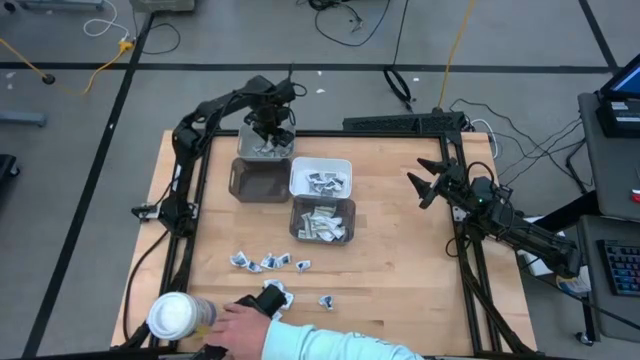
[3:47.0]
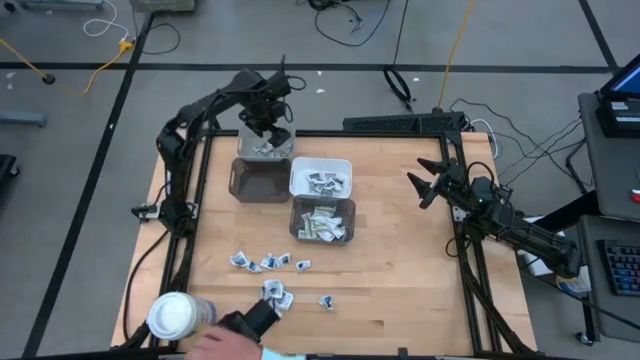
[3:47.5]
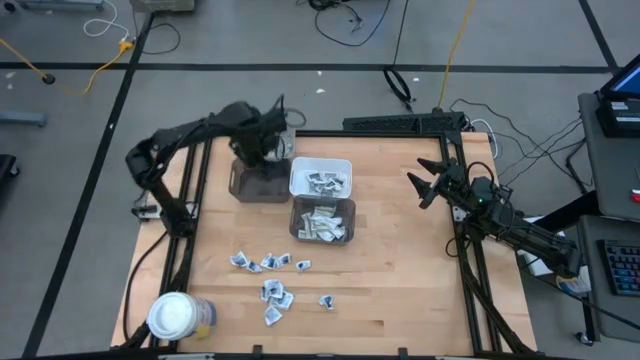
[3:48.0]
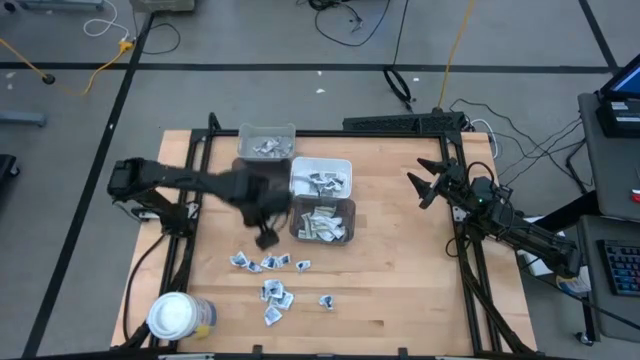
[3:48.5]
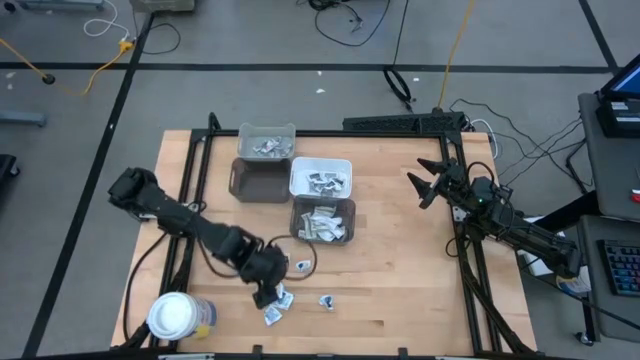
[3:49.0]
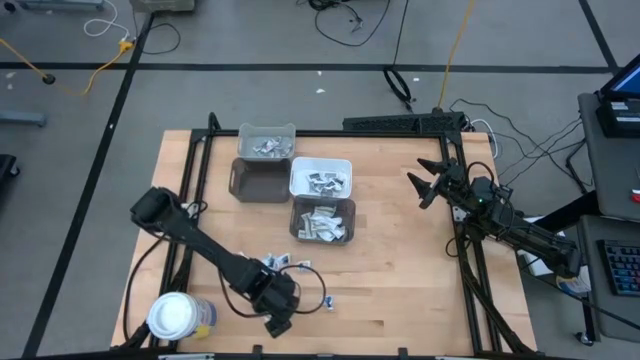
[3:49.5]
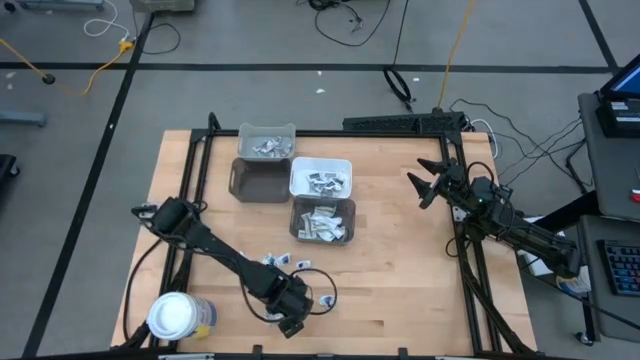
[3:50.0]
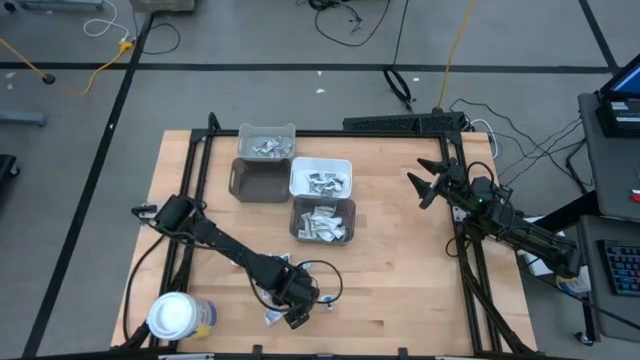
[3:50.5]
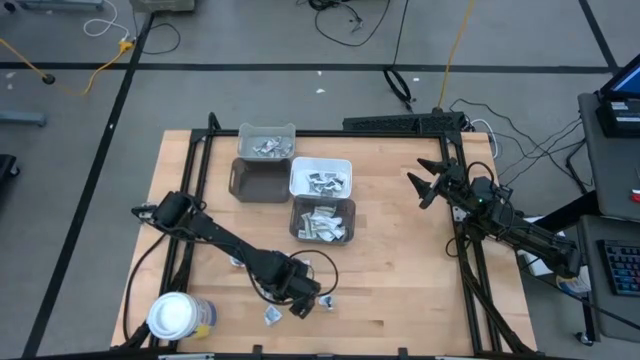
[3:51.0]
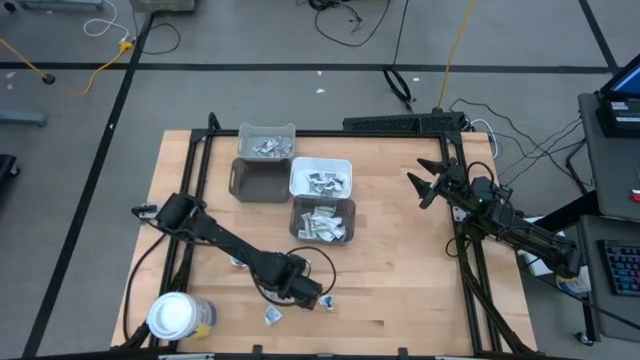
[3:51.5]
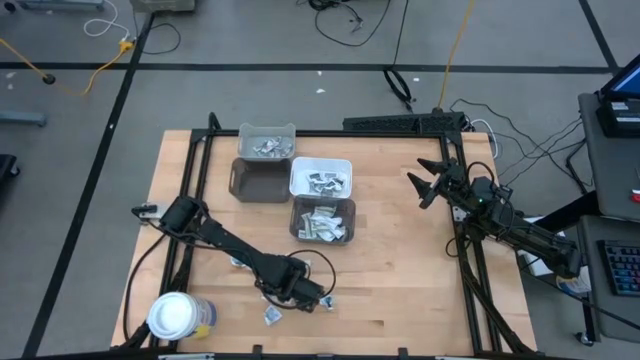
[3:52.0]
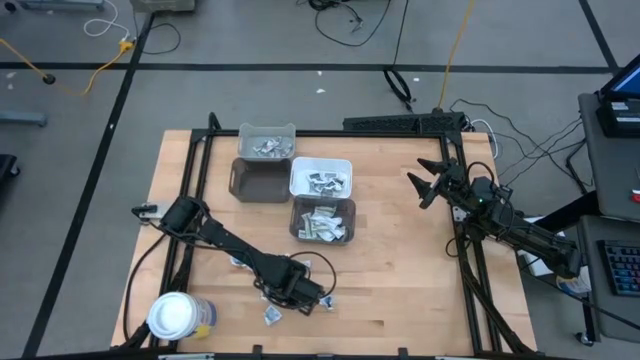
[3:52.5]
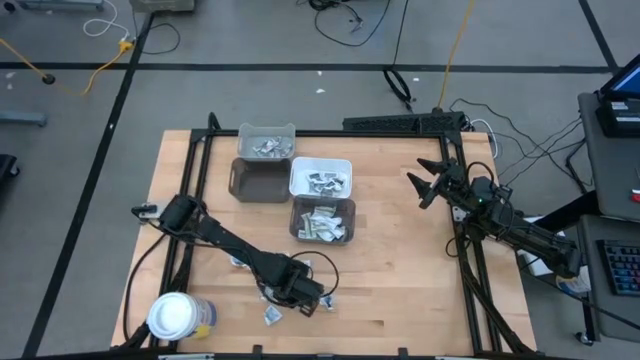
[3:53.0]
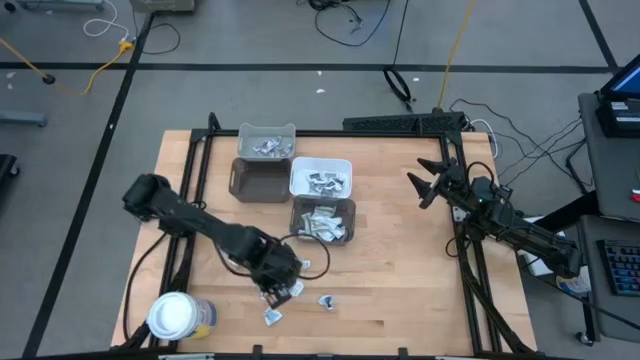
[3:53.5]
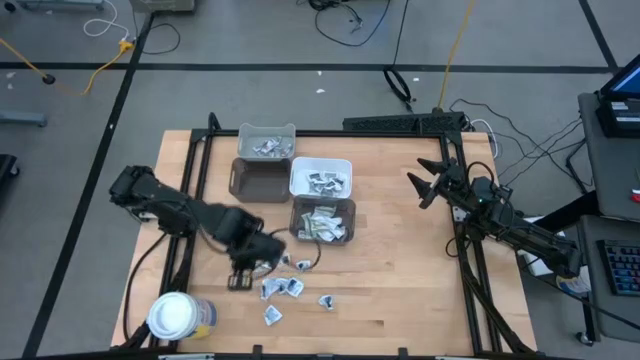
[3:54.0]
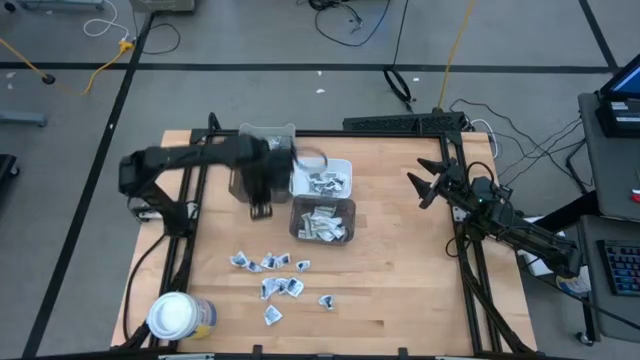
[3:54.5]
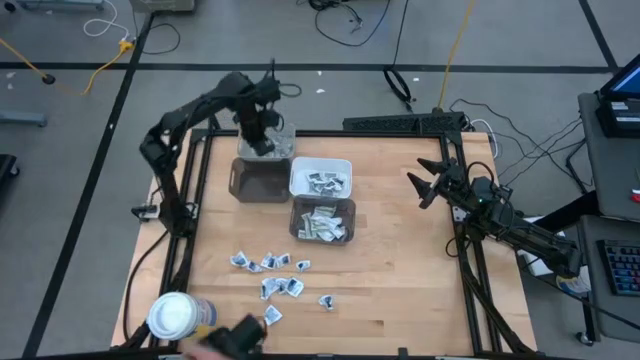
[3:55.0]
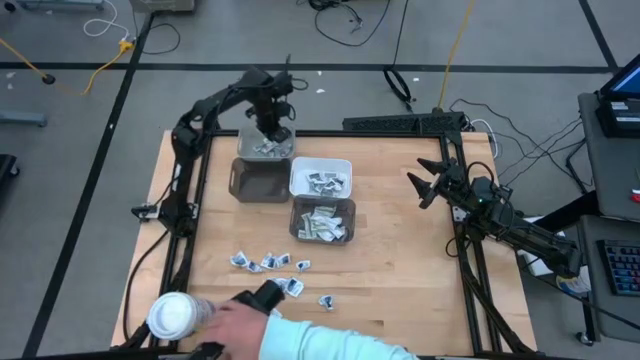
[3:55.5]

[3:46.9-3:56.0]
Task: Pick & Place First Aid Supplies
Put the orange ointment pack into the gray bin

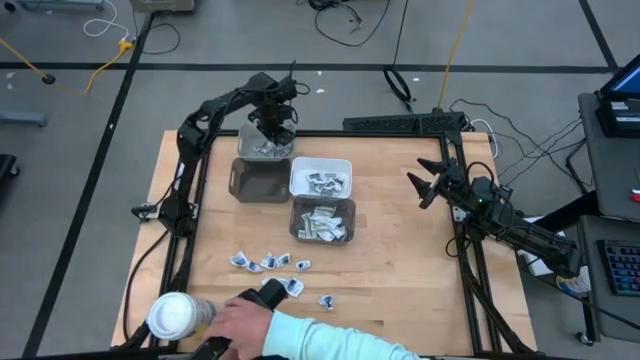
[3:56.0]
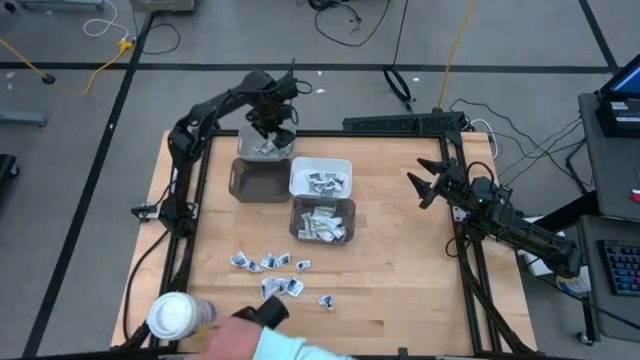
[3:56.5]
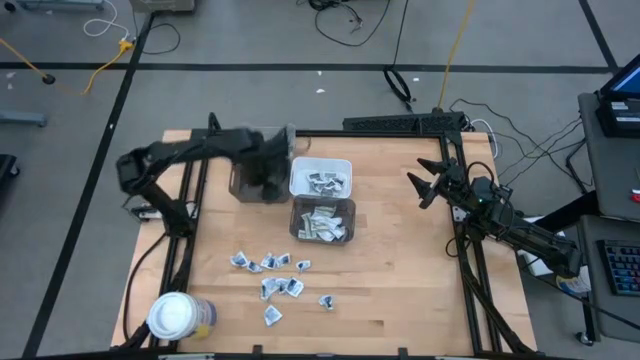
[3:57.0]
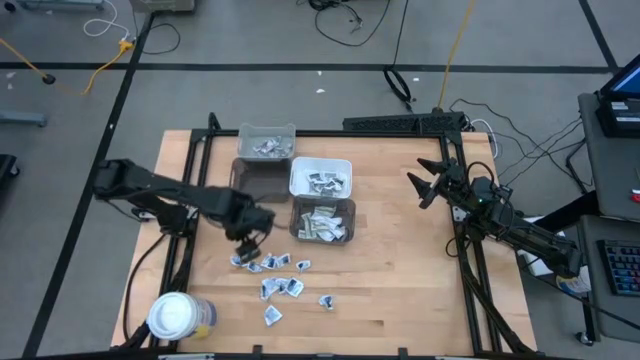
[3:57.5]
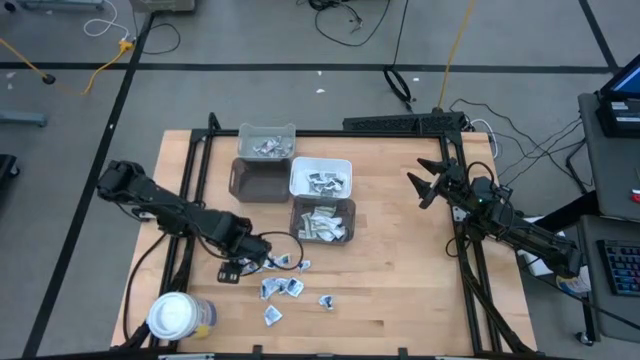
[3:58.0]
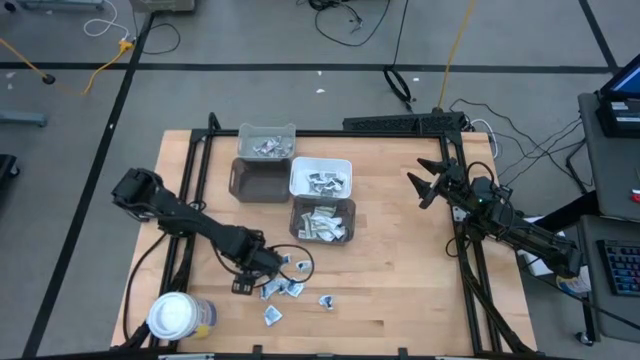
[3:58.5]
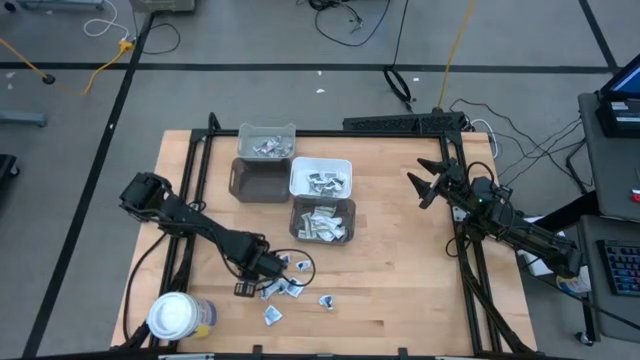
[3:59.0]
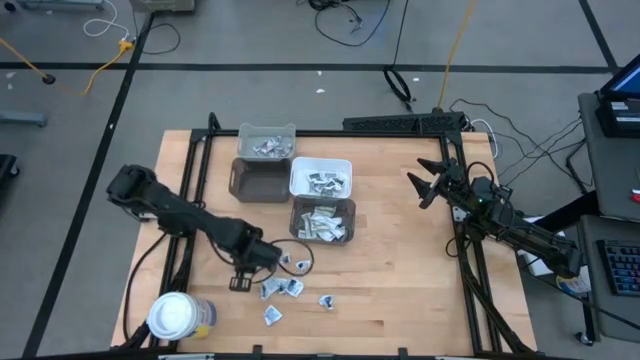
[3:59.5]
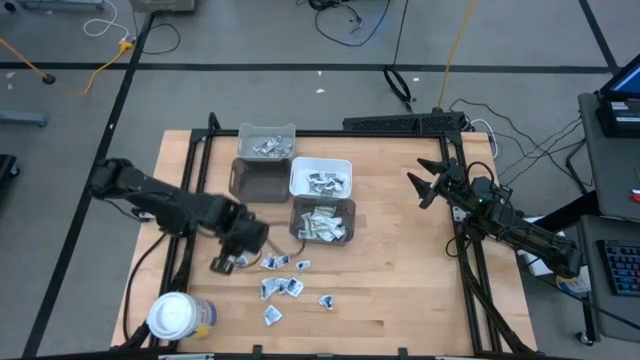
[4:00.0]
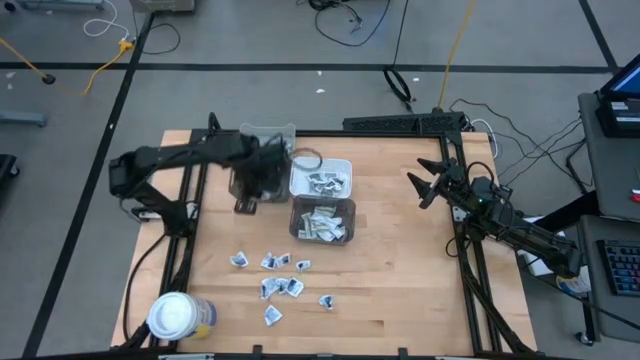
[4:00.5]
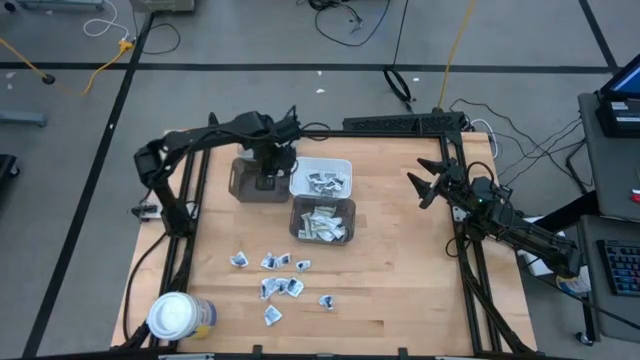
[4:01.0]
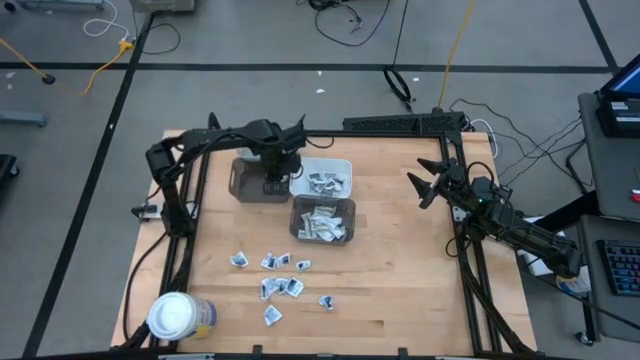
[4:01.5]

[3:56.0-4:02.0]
Put the blue alcohol pad into the left black bin

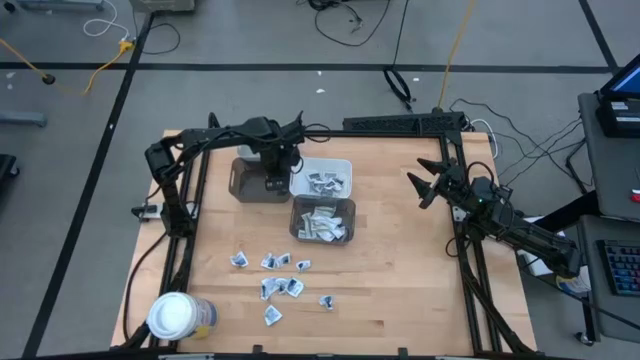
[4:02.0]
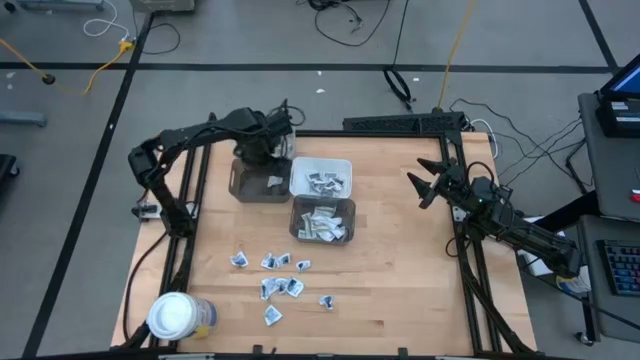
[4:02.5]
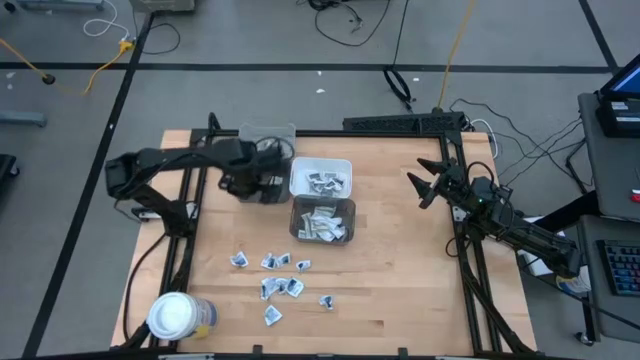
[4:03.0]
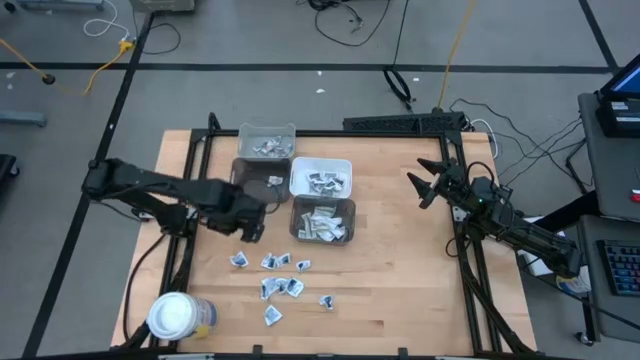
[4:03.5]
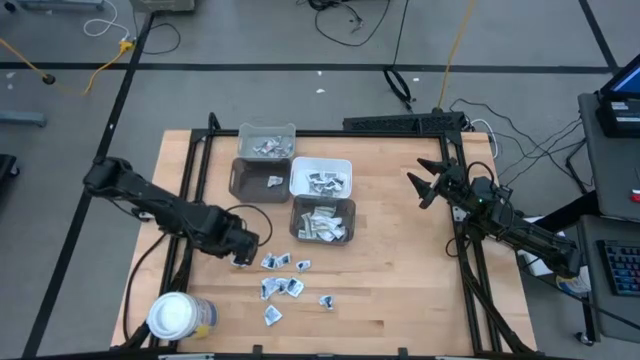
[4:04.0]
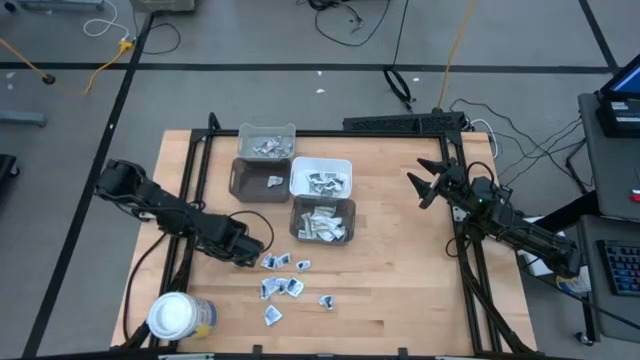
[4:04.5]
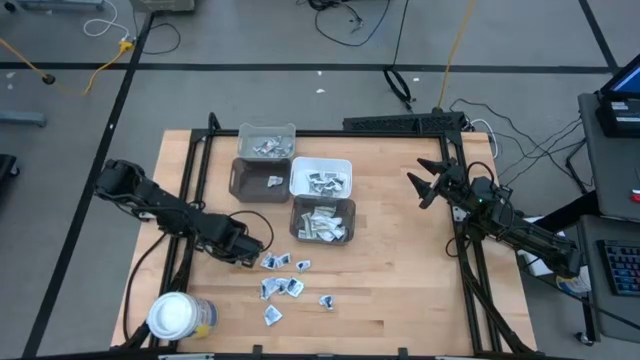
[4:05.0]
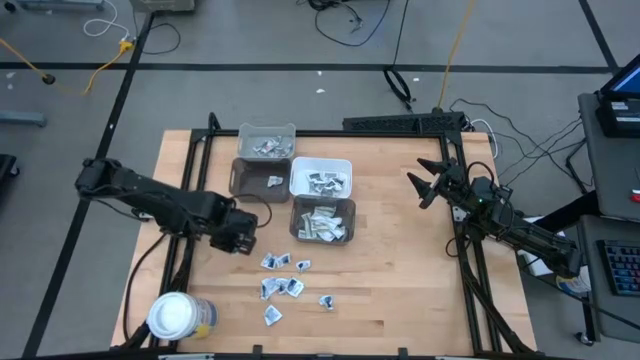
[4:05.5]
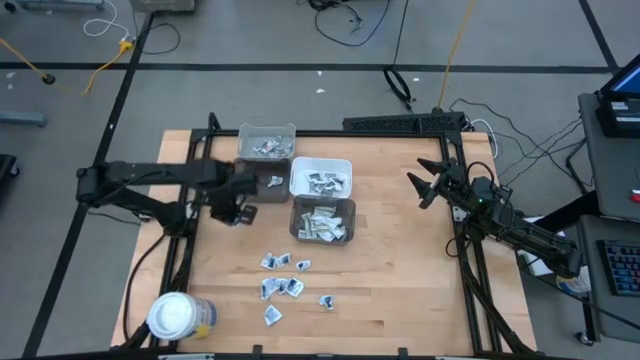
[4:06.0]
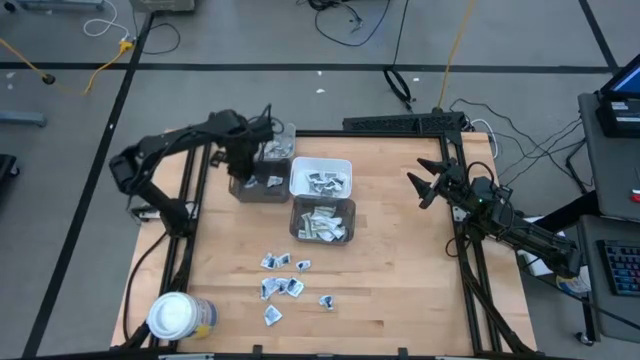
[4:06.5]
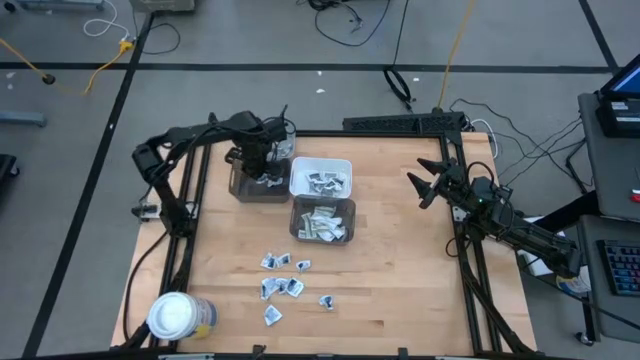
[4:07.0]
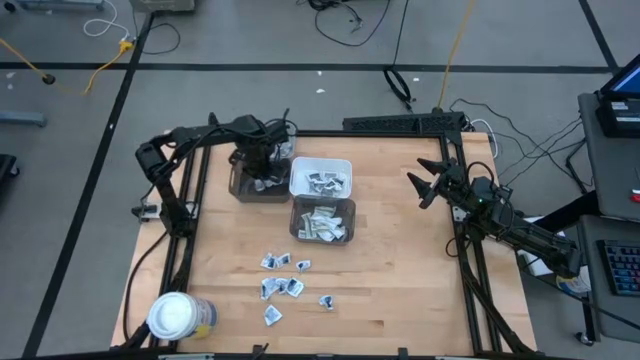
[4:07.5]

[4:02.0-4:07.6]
Put the blue alcohol pad into the left black bin
